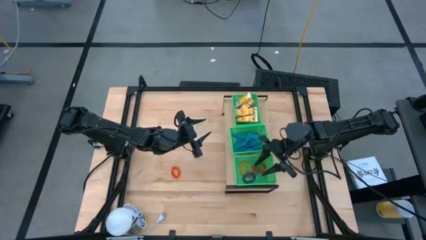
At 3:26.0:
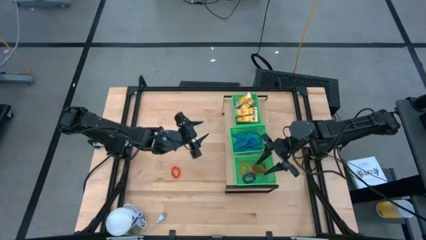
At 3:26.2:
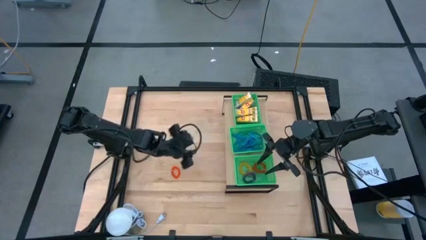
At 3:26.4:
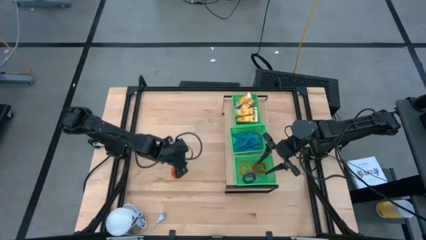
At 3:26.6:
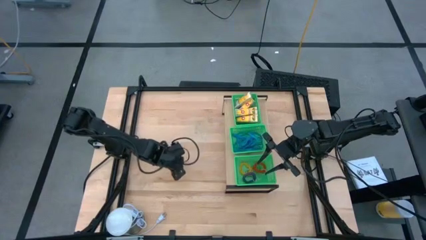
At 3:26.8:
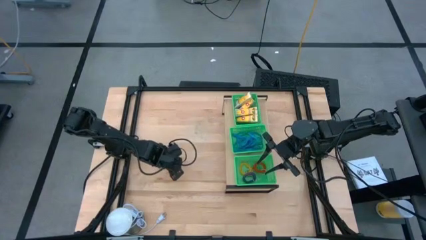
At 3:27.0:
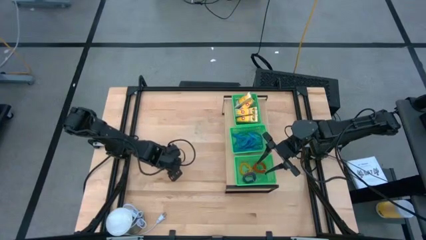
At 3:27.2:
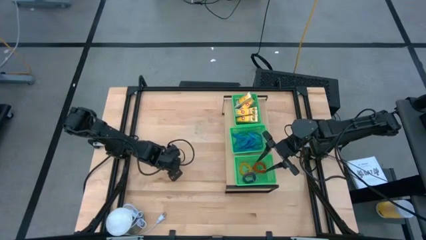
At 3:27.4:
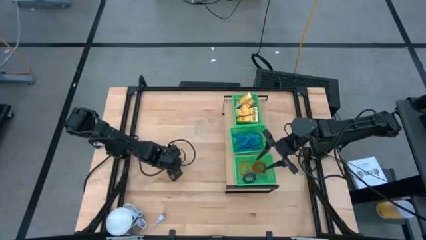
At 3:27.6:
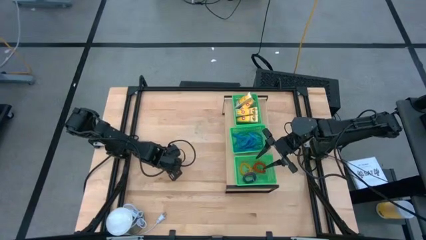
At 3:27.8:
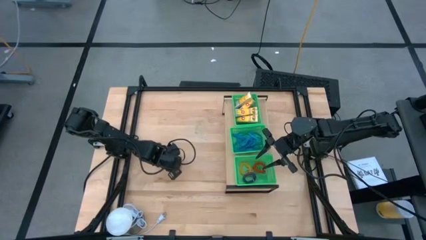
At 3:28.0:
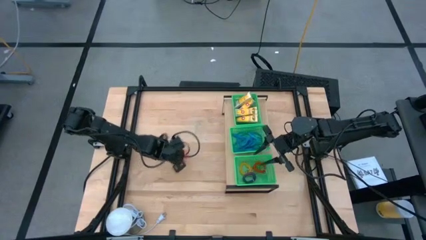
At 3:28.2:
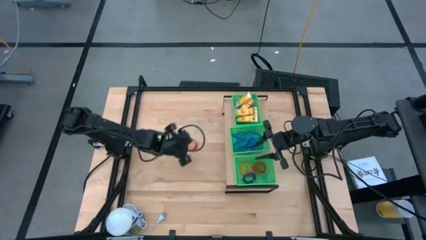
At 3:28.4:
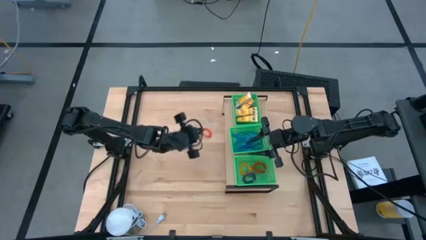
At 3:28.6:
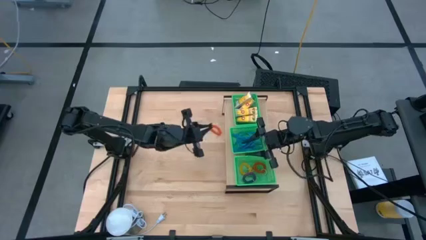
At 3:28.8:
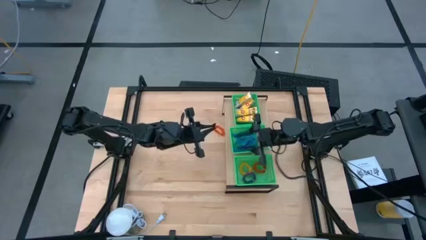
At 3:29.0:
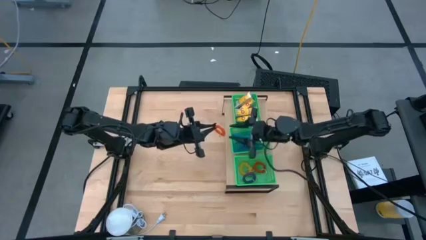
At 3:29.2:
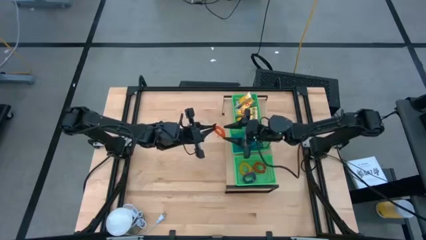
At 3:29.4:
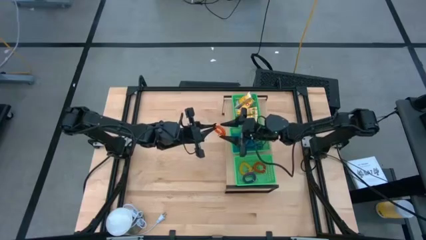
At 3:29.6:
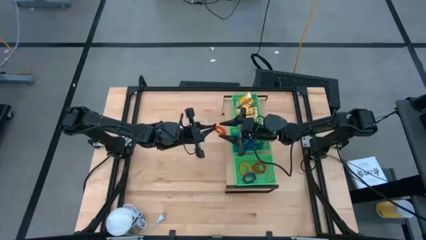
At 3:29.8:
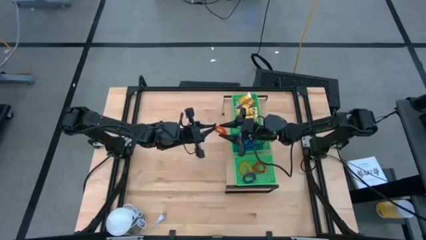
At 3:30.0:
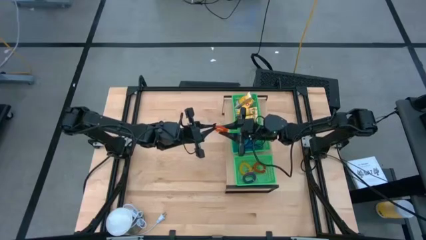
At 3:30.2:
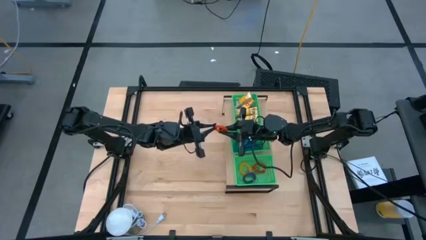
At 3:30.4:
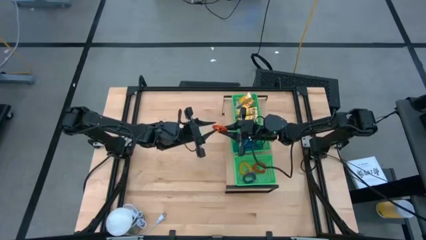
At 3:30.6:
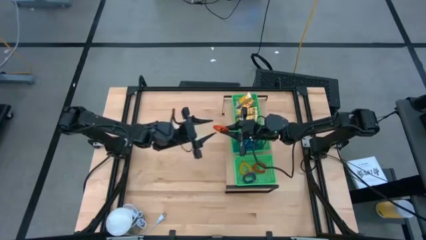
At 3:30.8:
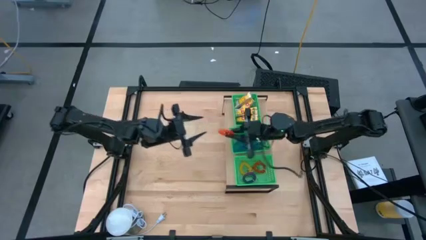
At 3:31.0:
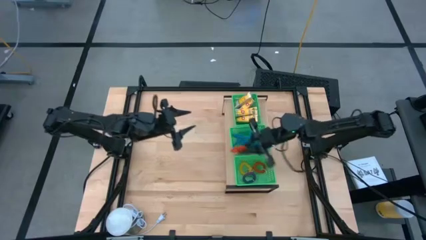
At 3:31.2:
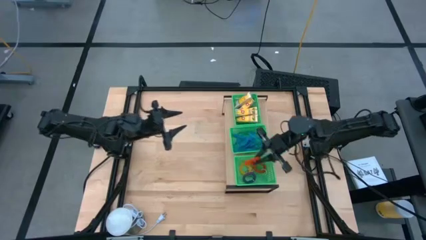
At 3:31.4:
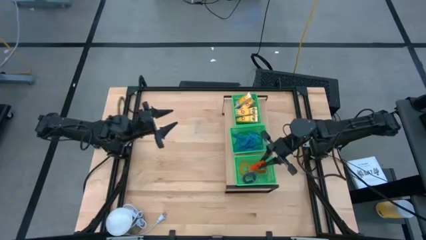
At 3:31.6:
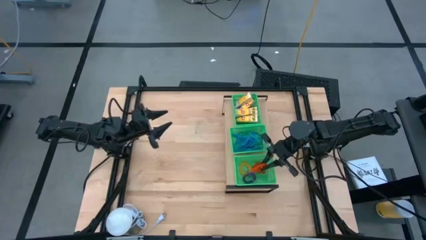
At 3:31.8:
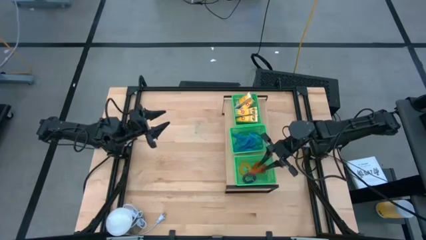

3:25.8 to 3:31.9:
Task: Pick & Place Office Desk Supplies
Put the orange spring keychain into the bottom green bin

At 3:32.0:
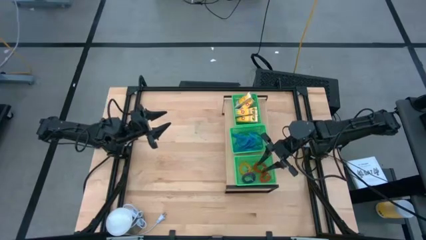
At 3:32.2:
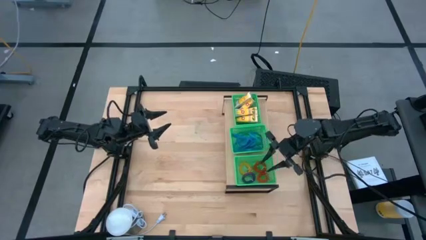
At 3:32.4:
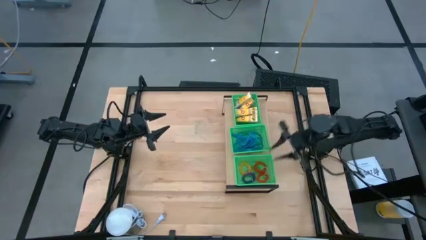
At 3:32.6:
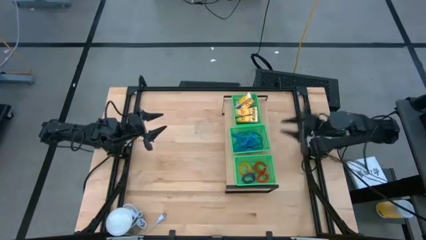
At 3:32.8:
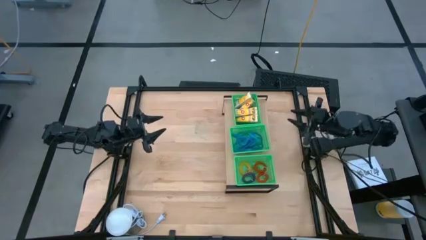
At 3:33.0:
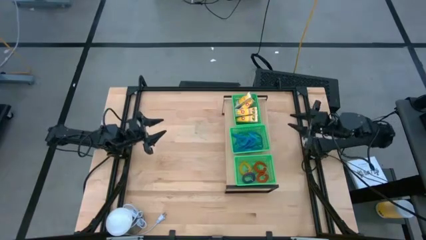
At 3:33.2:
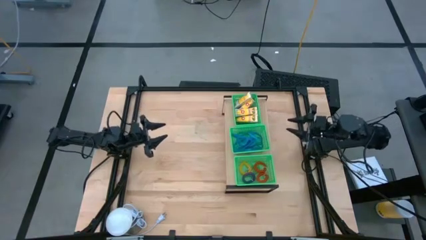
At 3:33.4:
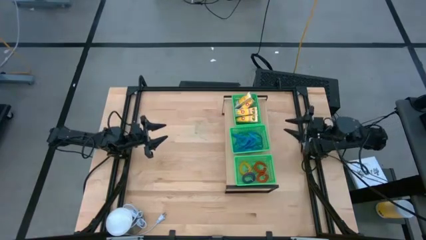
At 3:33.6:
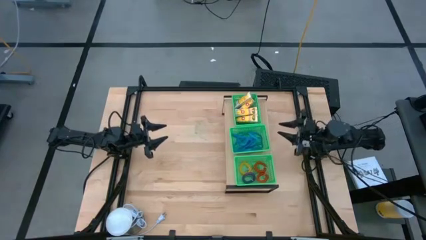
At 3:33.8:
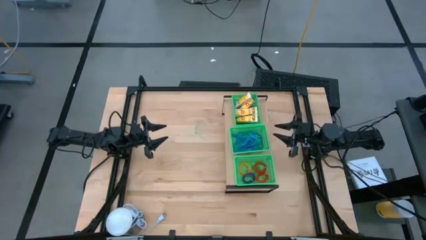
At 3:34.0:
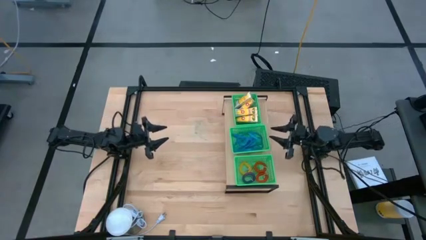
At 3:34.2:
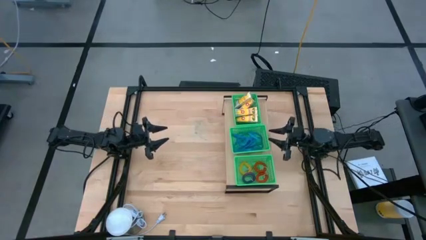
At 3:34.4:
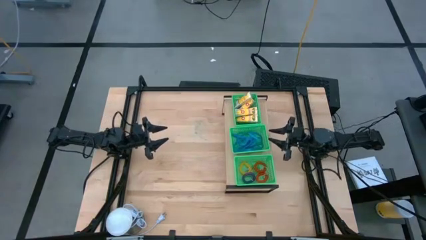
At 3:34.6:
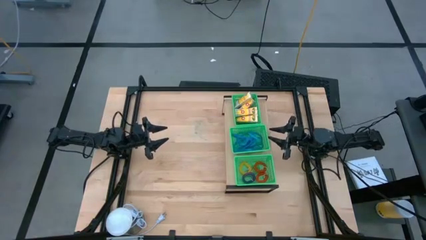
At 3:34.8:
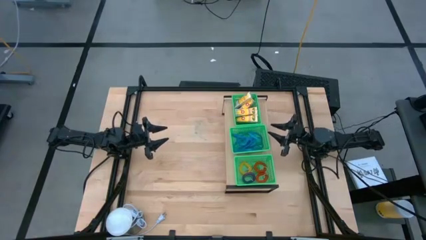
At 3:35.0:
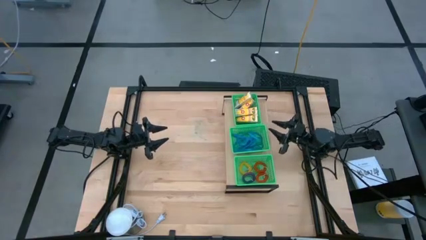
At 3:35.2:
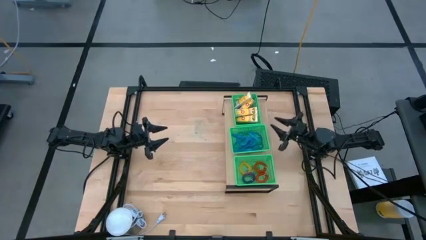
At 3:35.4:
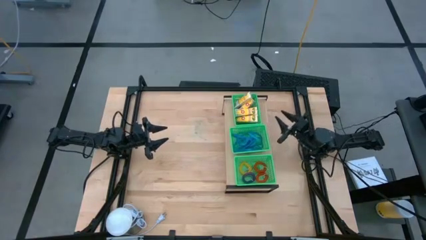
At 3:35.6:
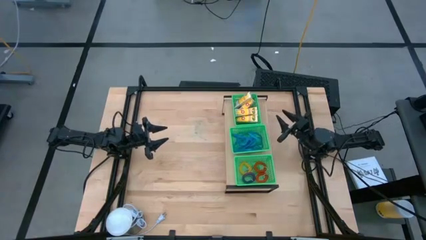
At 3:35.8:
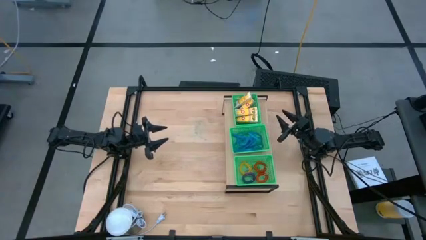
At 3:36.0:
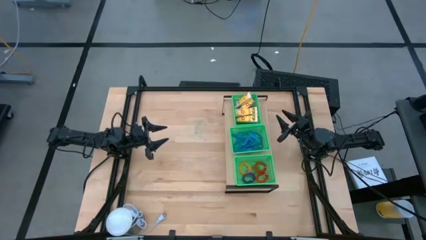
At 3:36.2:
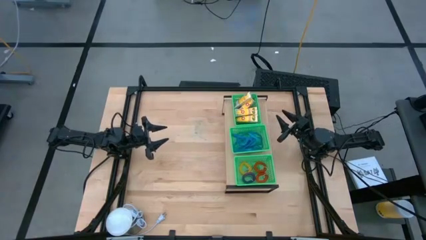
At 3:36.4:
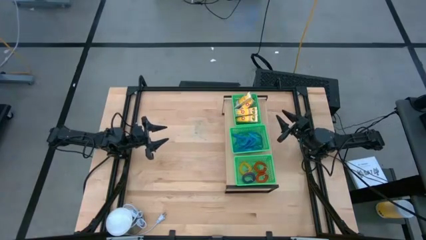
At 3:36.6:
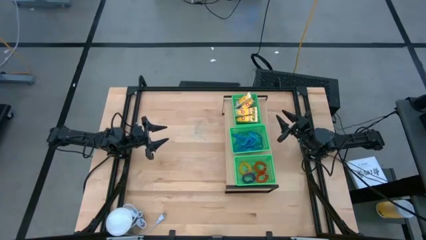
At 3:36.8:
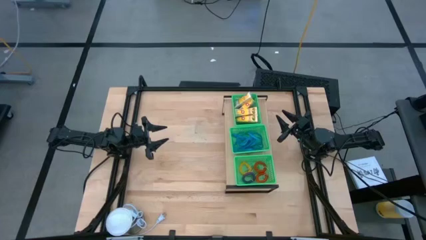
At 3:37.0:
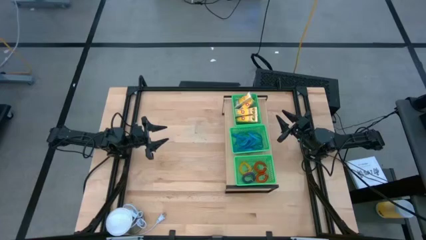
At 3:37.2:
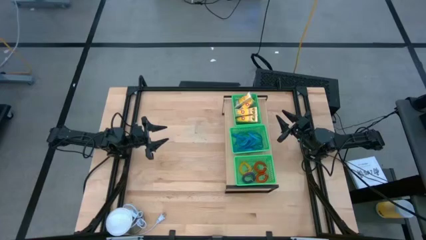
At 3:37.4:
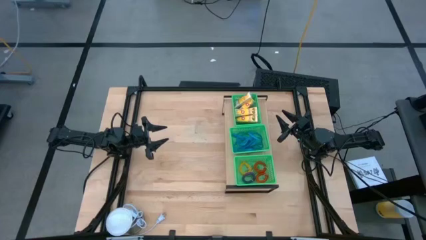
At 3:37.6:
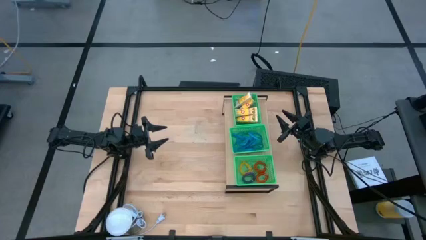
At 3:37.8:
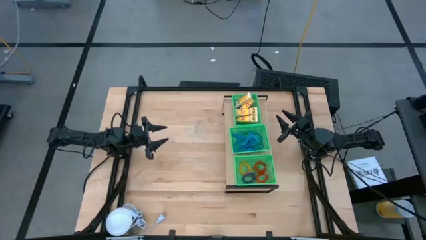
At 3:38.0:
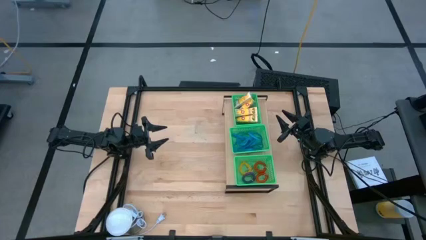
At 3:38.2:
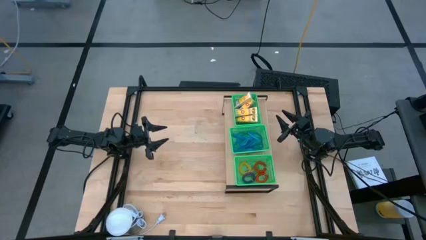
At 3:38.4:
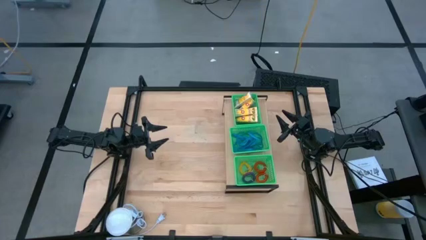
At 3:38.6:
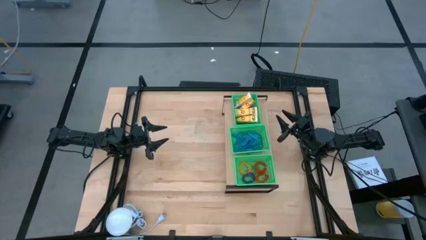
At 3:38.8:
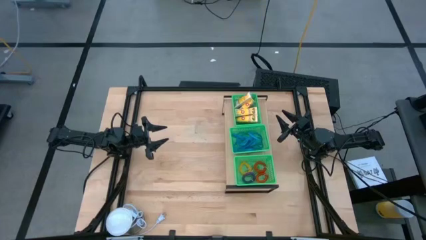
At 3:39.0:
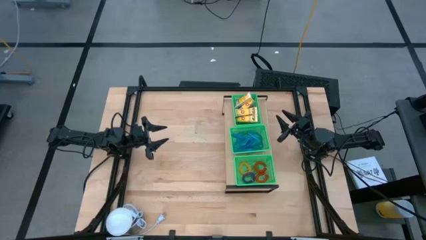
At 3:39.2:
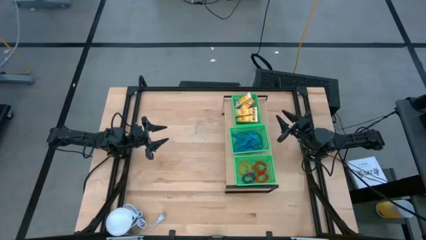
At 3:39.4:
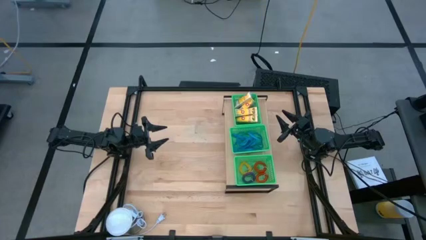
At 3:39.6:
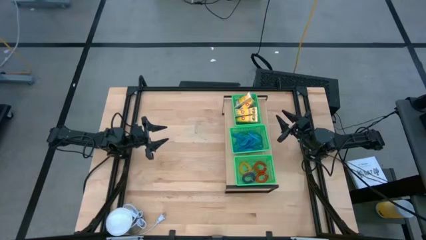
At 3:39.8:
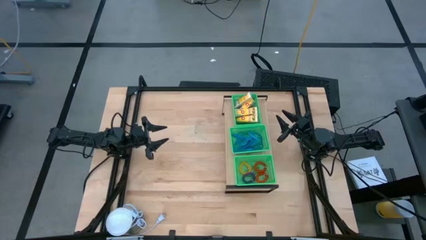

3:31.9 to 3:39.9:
Return to Home Position
